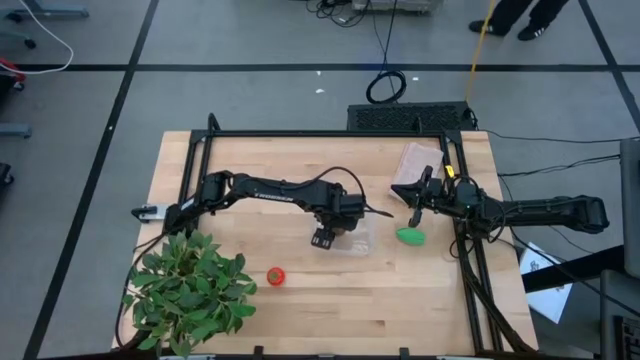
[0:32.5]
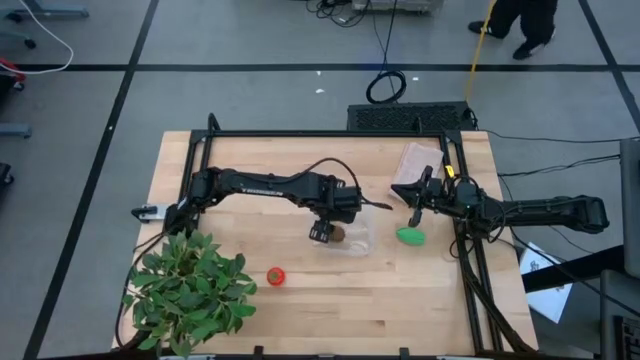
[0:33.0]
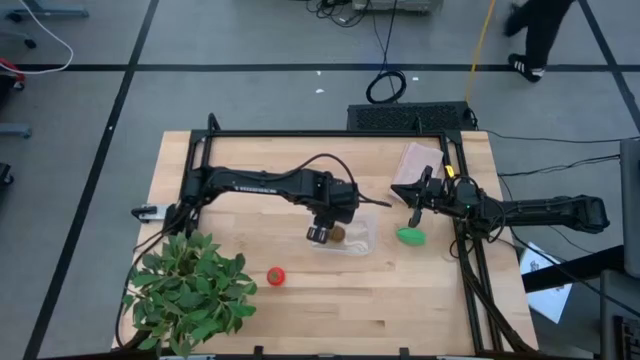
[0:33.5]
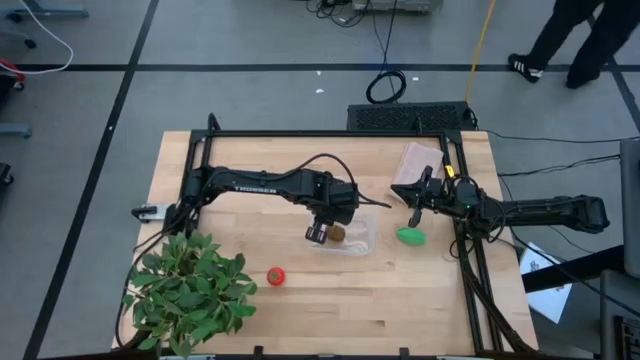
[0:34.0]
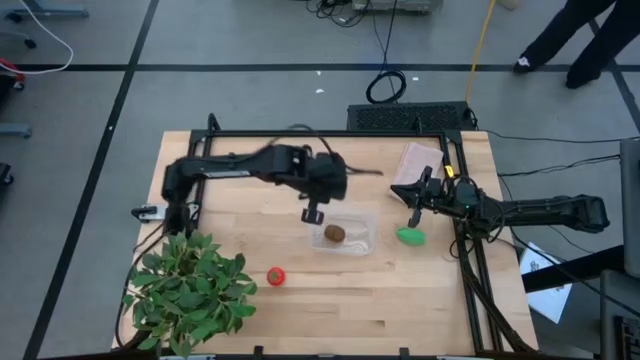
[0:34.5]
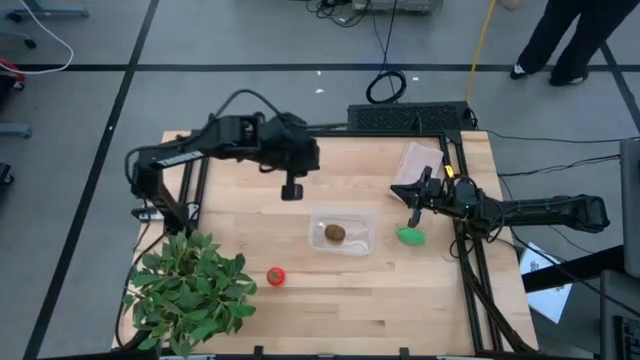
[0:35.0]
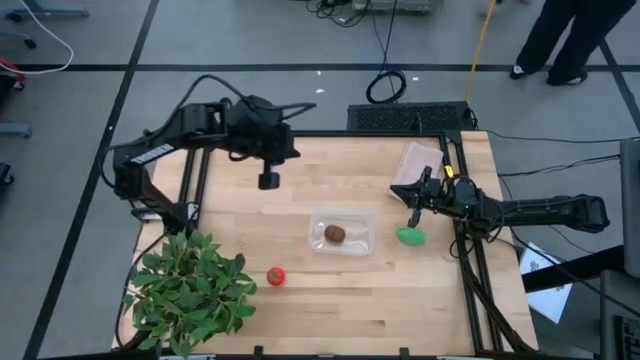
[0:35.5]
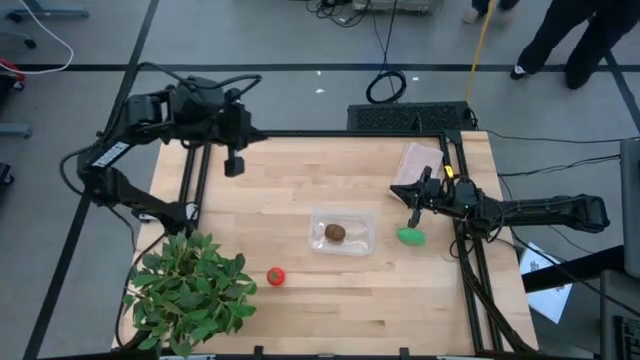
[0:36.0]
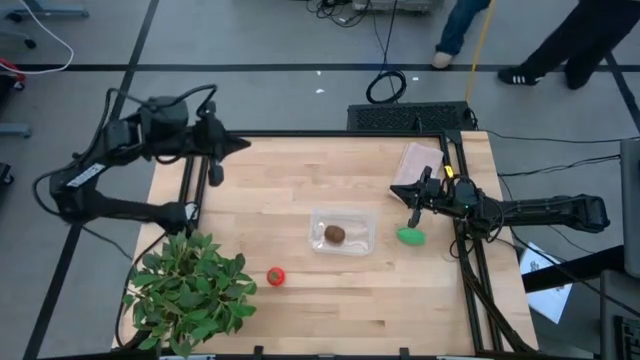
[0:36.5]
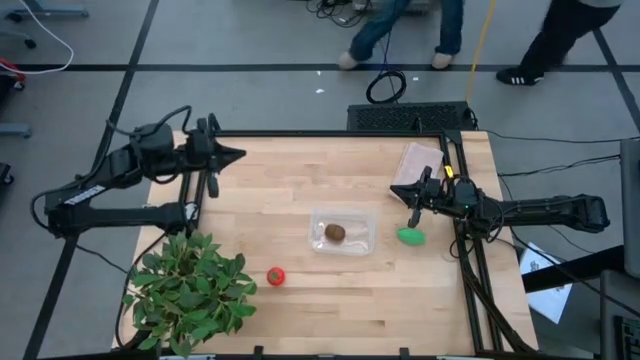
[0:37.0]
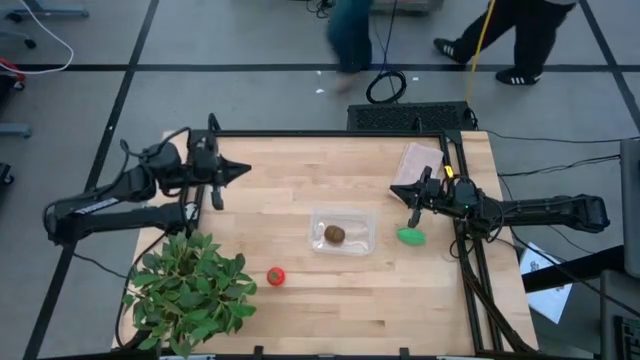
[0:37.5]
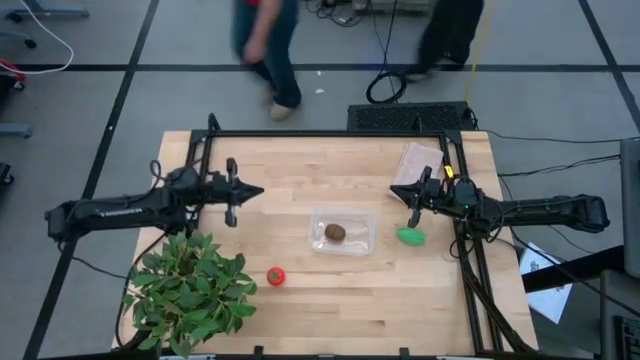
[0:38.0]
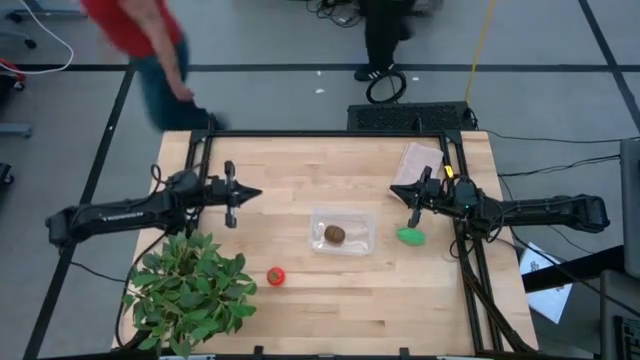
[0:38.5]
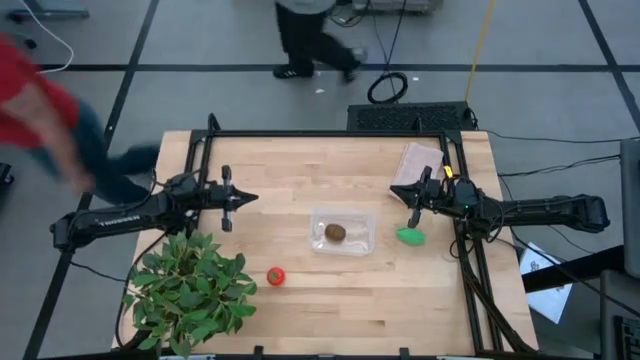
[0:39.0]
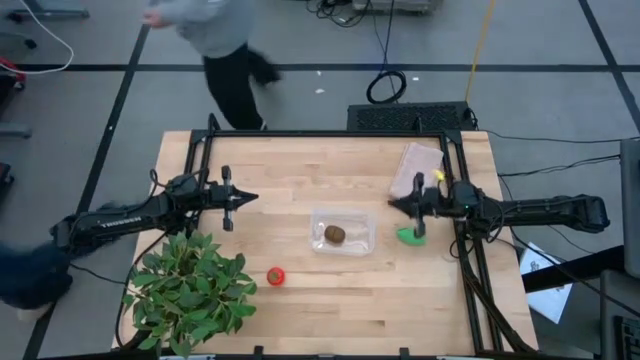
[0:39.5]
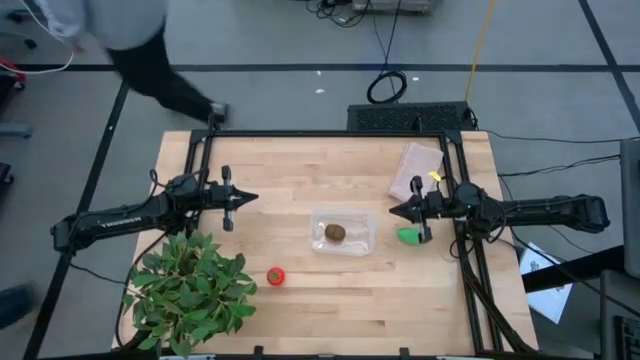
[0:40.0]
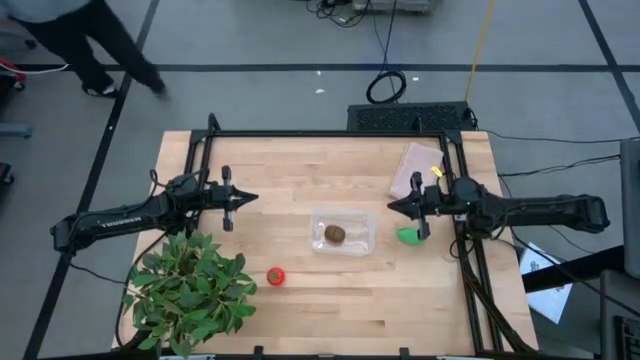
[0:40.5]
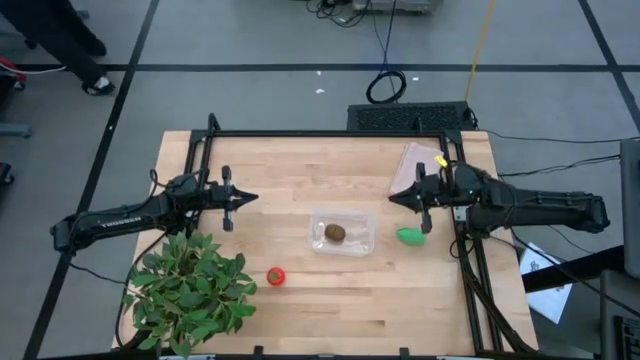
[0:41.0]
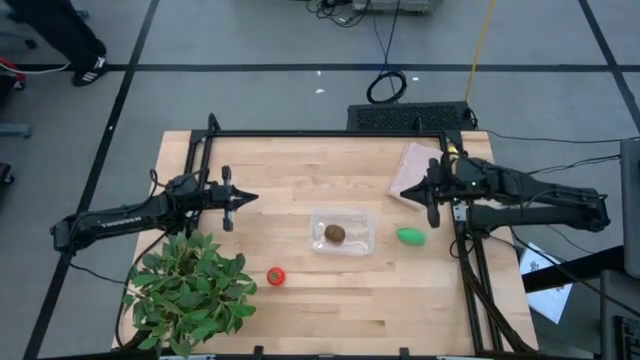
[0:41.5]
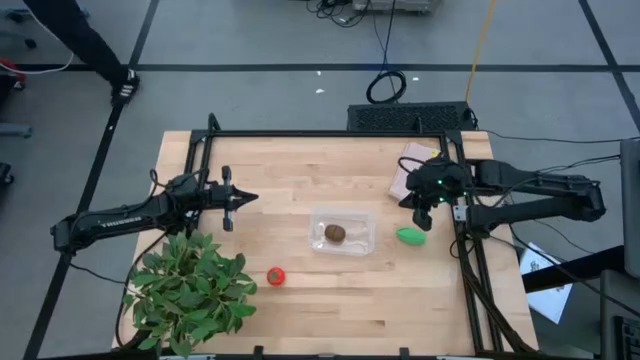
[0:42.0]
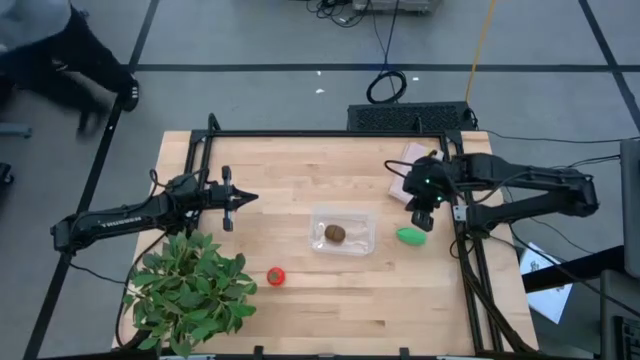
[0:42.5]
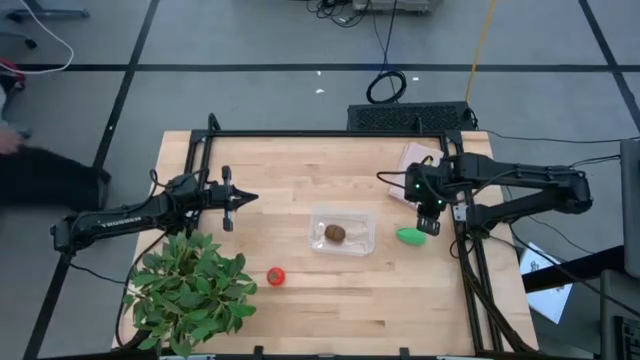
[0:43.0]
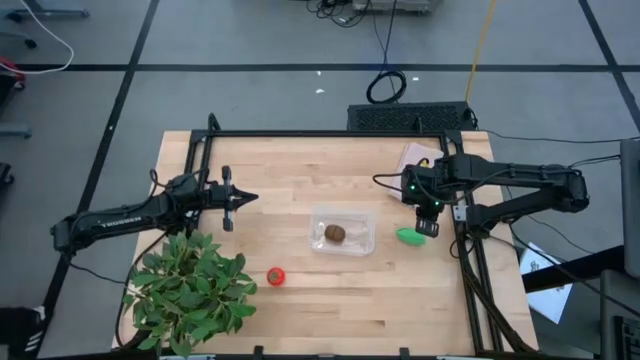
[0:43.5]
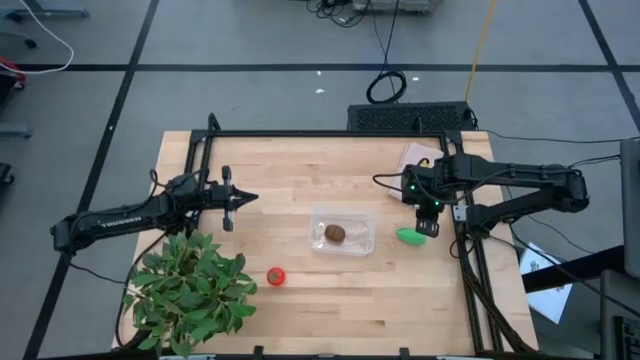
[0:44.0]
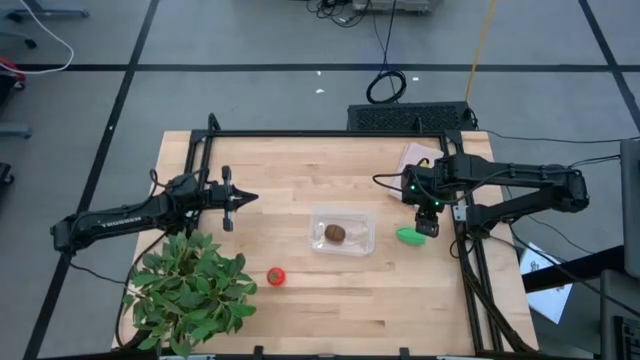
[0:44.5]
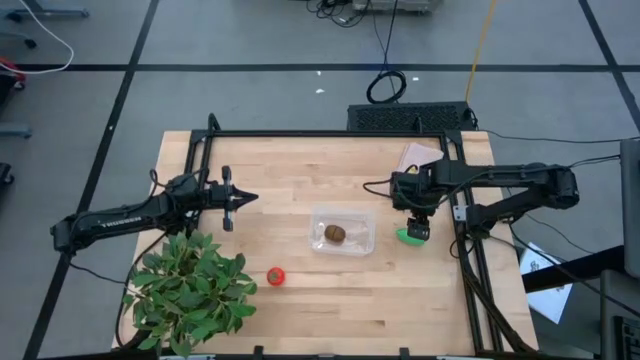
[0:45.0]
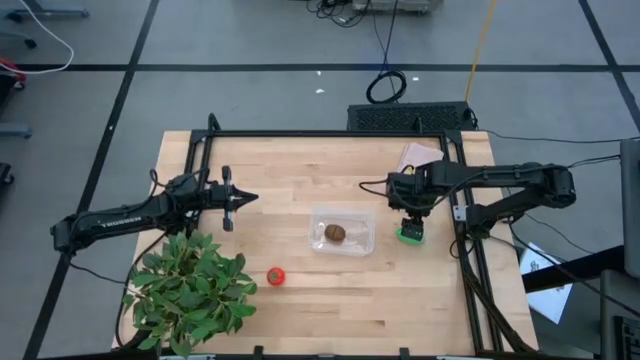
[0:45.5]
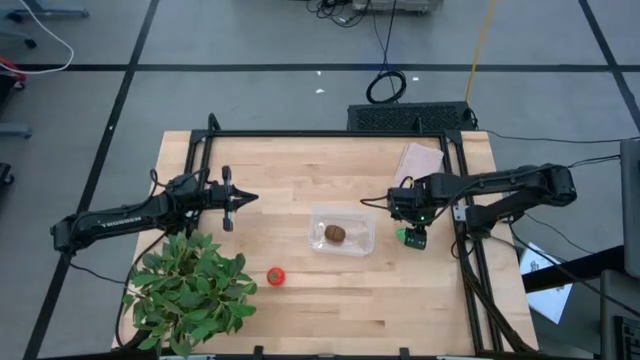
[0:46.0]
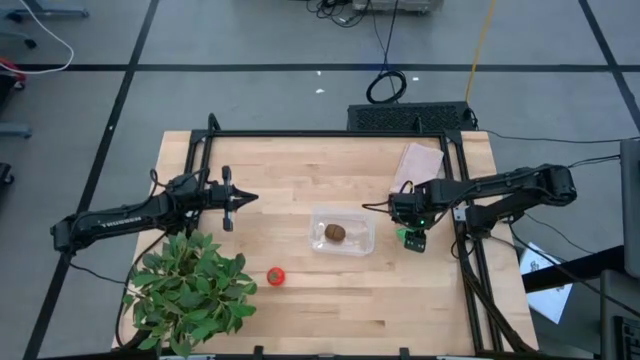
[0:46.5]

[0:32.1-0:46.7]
Task: Pick and placing Produce into tupperware
Put the green corn into the transparent bin
